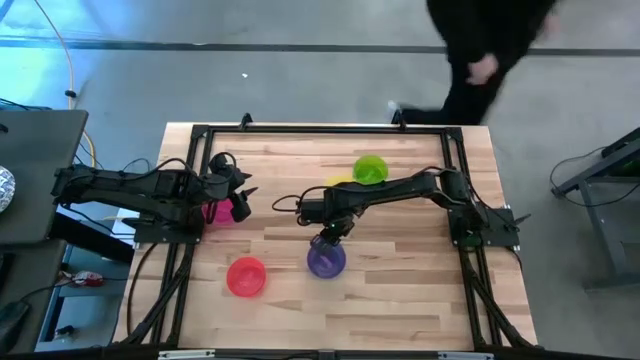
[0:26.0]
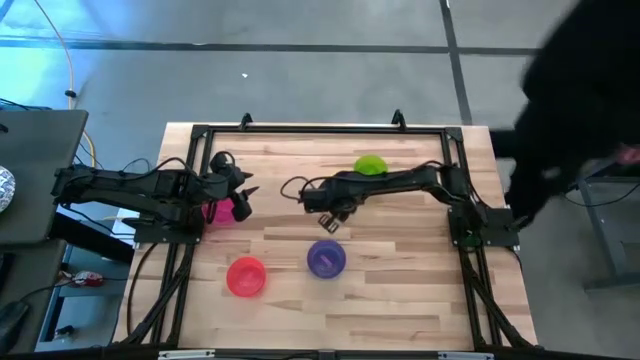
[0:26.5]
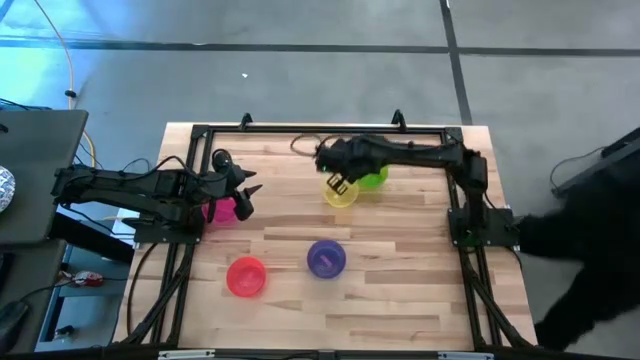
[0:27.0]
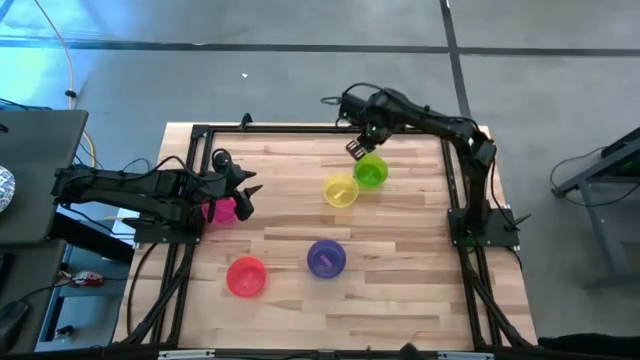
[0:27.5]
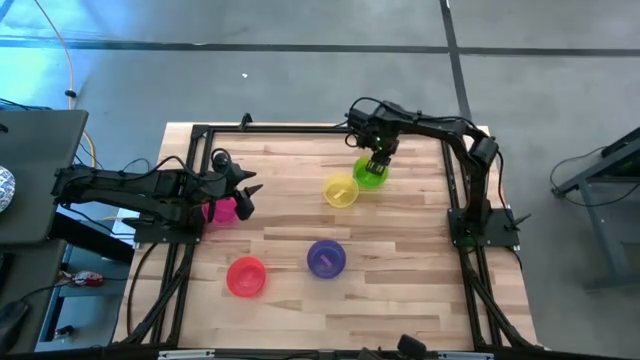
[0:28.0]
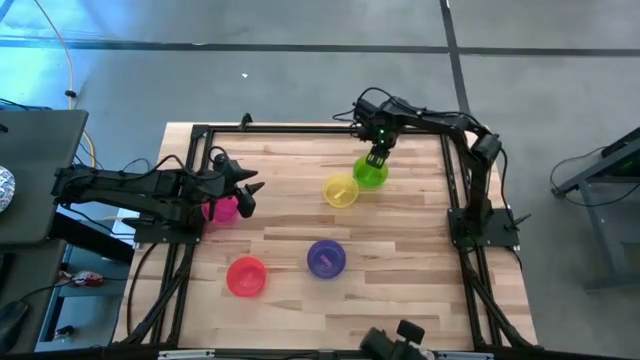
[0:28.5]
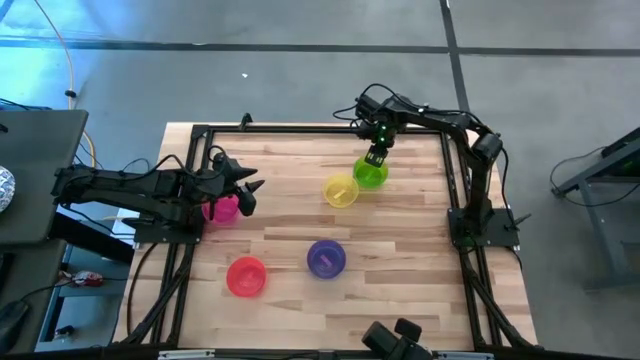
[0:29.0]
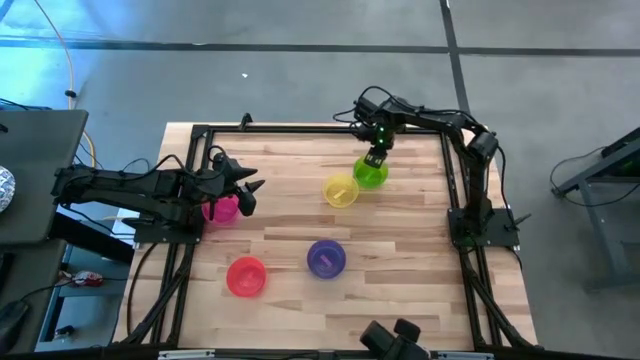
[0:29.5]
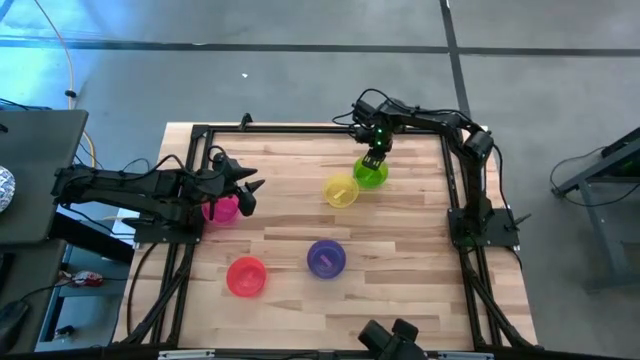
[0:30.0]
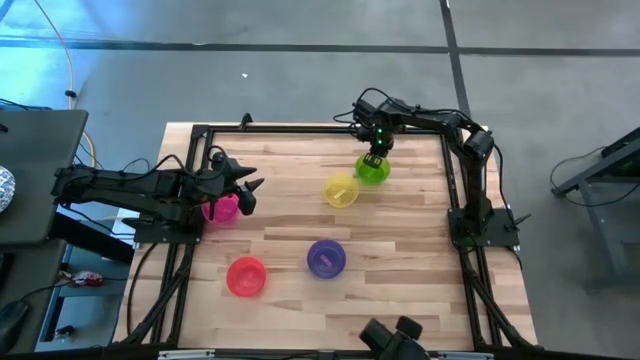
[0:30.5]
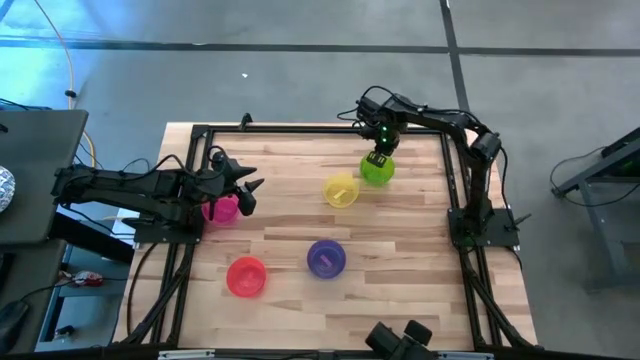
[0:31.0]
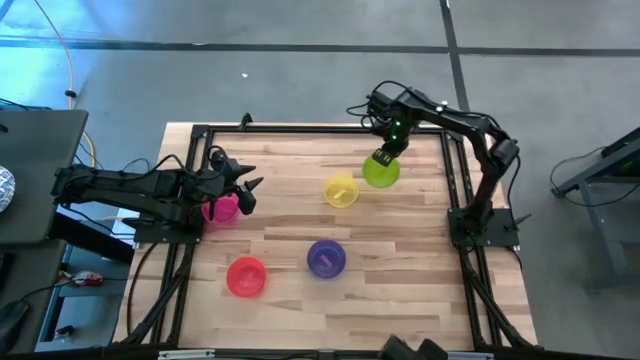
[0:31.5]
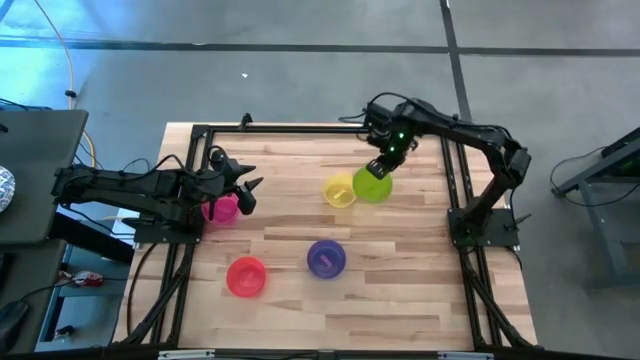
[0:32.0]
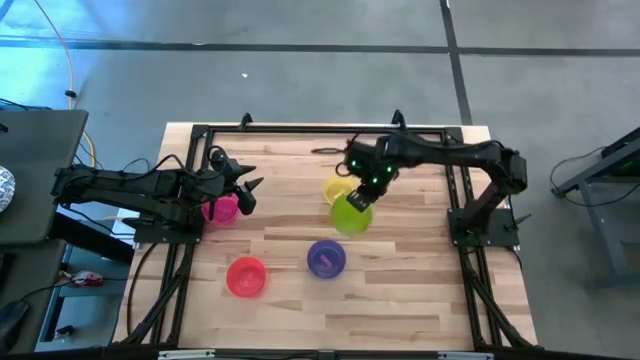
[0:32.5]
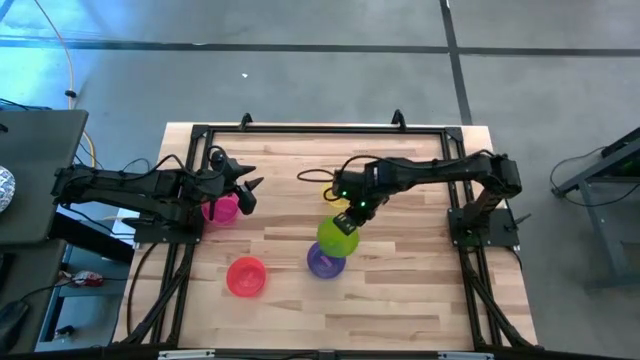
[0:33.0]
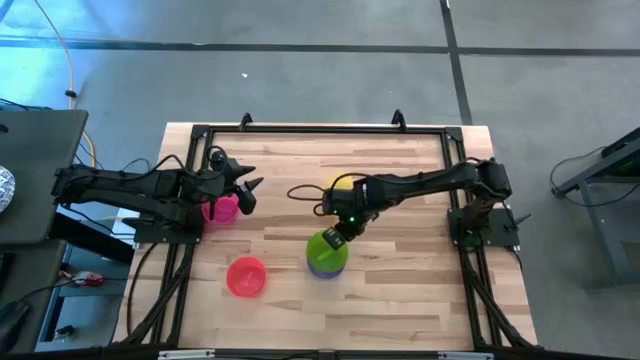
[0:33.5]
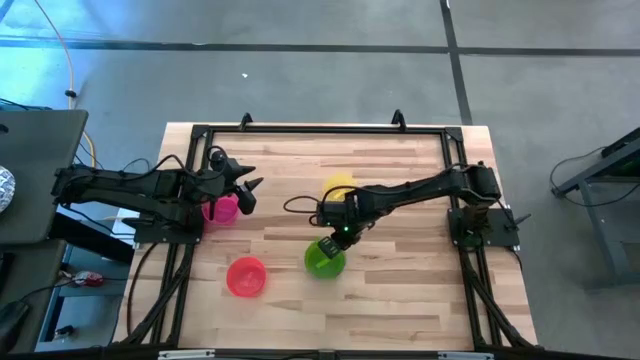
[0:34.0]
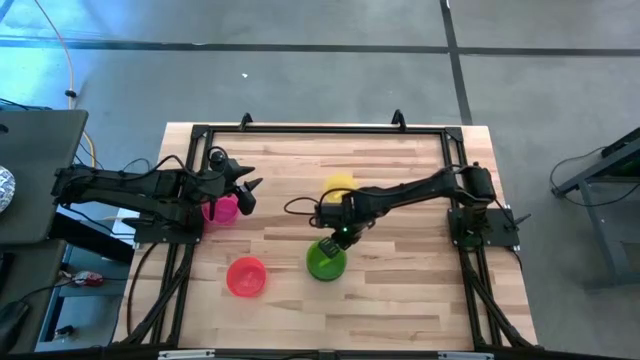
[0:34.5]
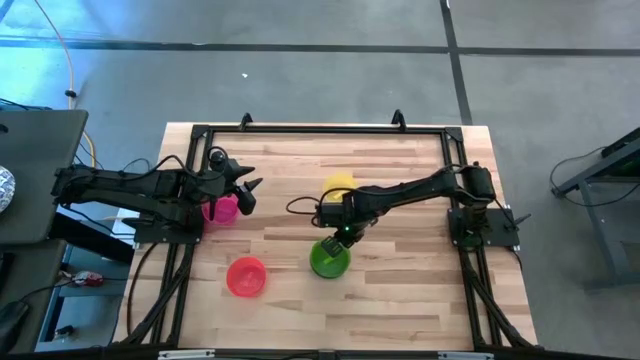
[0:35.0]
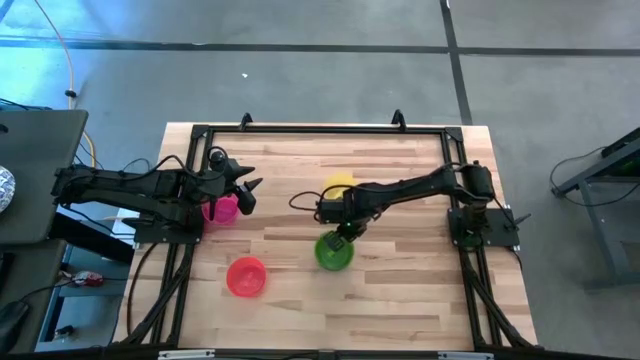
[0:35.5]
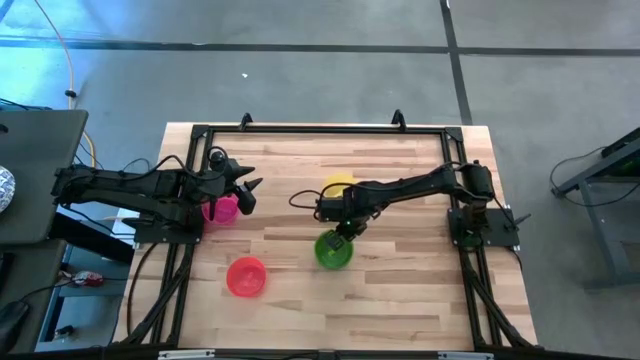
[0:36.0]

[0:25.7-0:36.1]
Task: Nest bowls inside each other
Stack the green bowl on the purple bowl

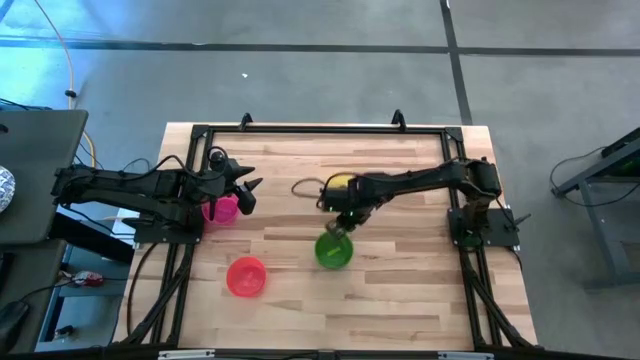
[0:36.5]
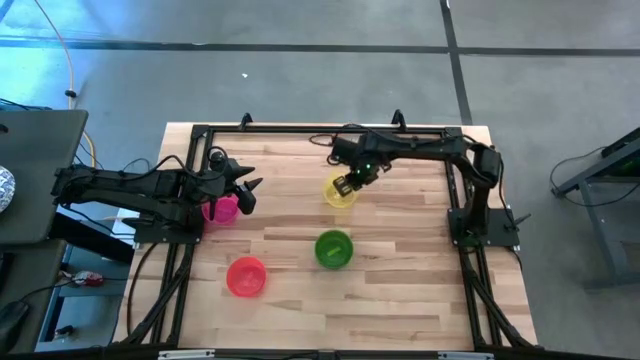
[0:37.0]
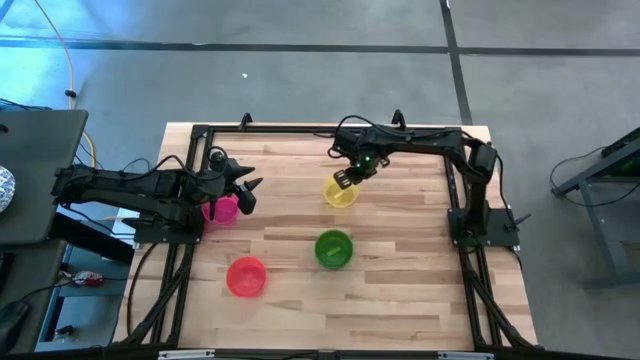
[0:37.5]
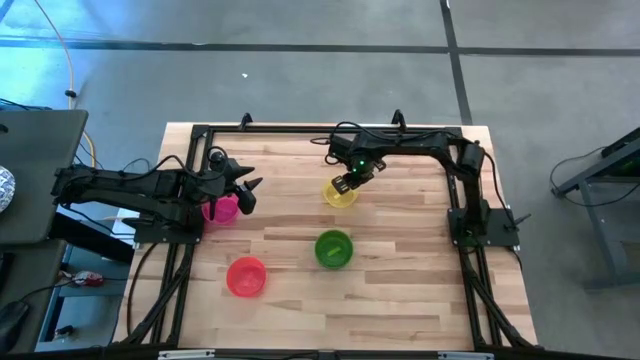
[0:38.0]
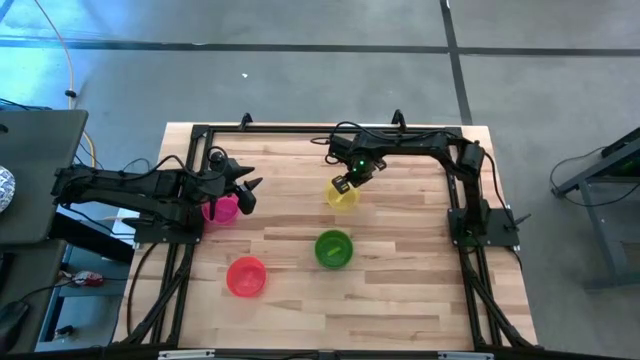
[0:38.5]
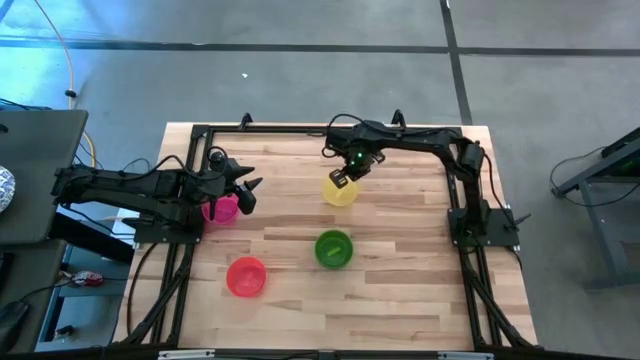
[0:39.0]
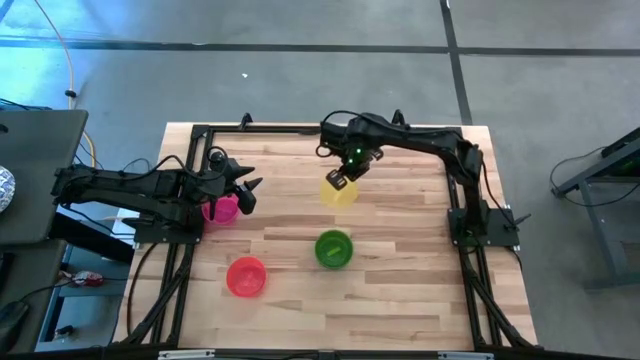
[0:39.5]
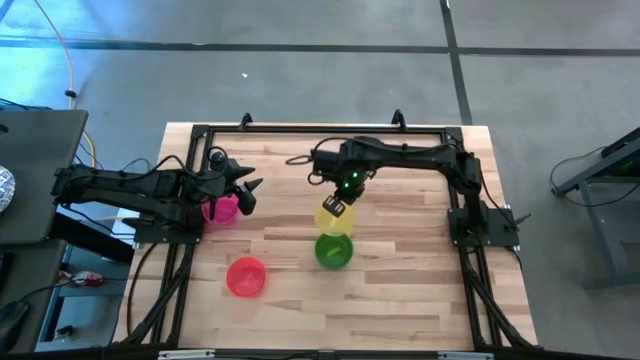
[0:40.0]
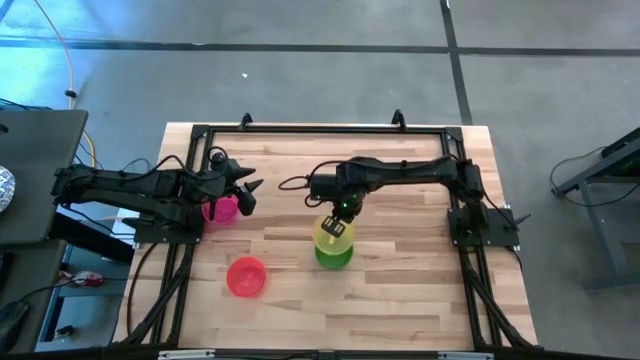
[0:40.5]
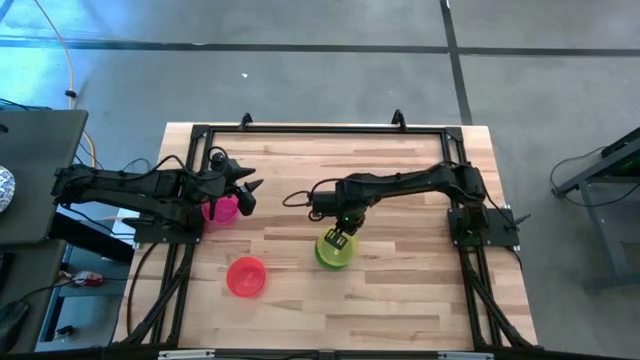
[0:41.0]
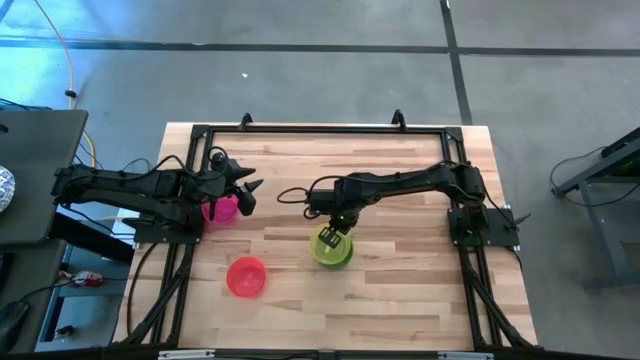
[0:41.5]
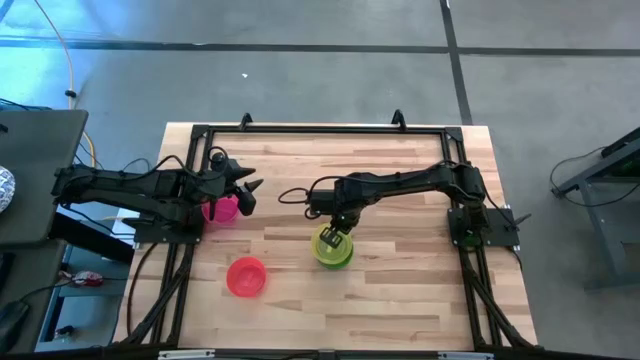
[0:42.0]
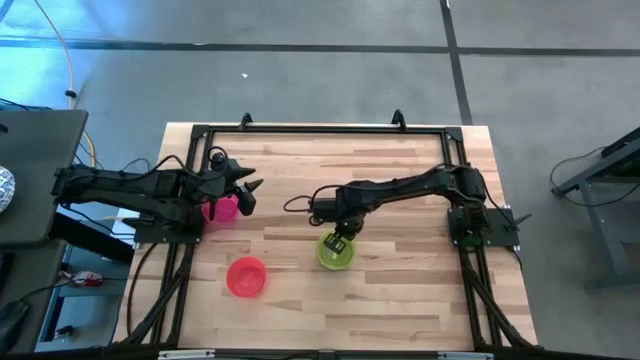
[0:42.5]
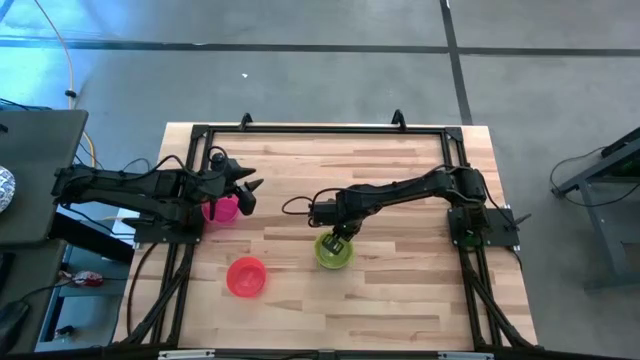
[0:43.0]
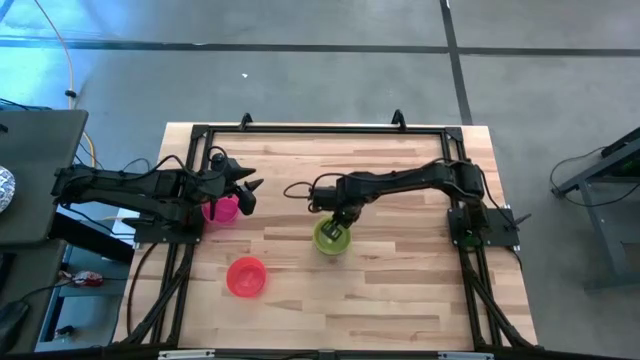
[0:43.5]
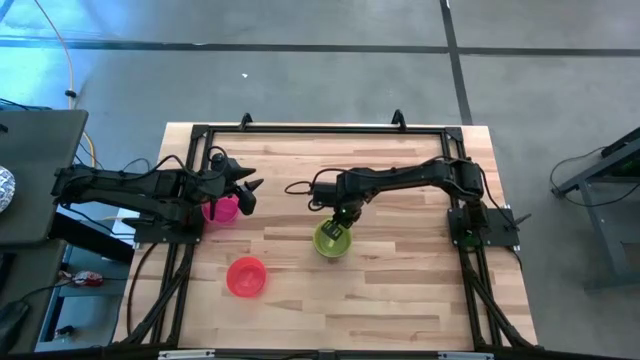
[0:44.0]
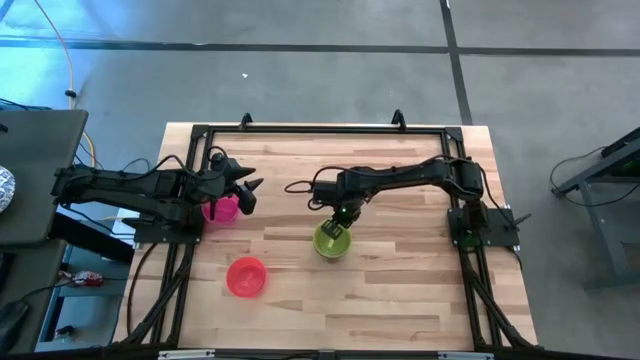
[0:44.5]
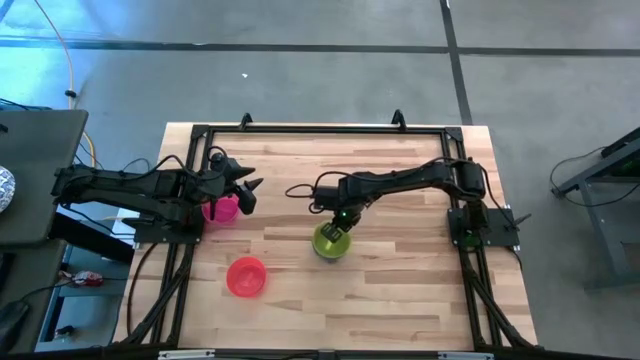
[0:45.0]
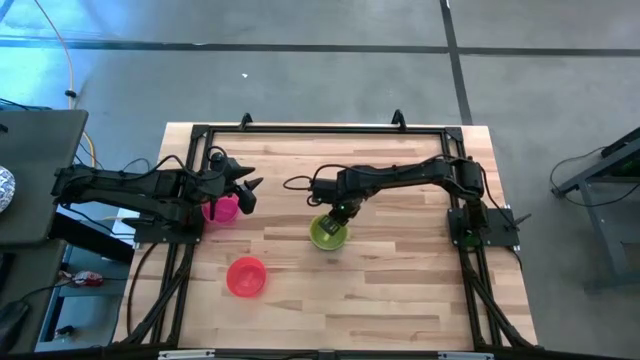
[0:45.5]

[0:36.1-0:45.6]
Stack the yellow bowl on the green bowl
